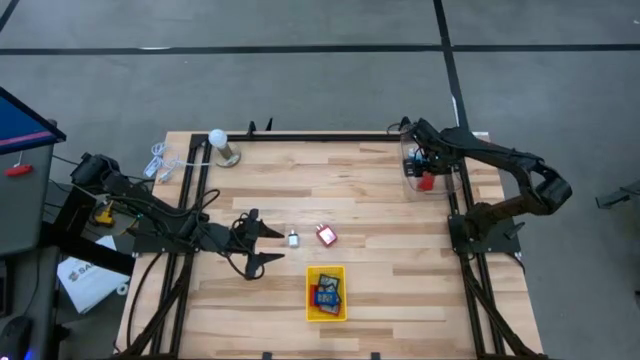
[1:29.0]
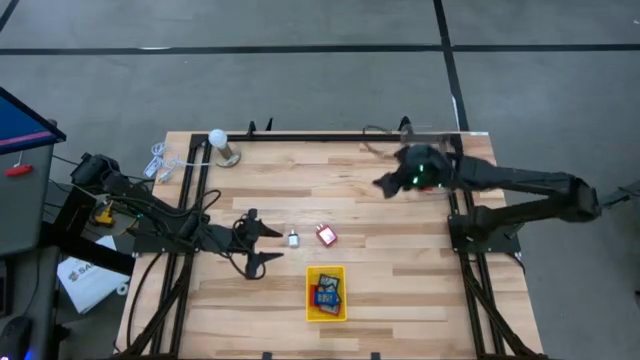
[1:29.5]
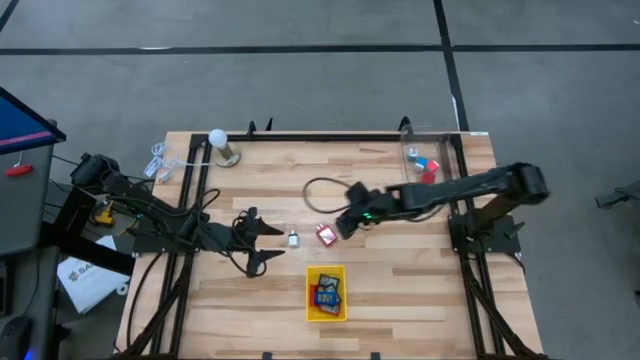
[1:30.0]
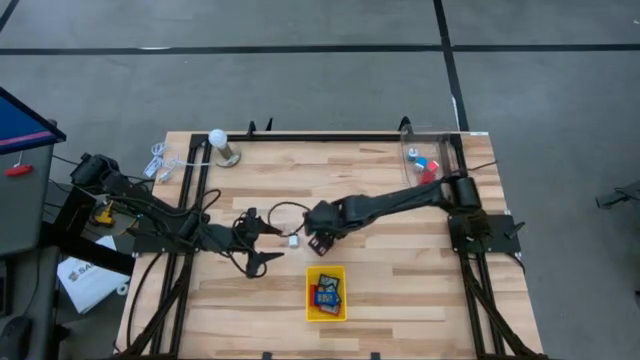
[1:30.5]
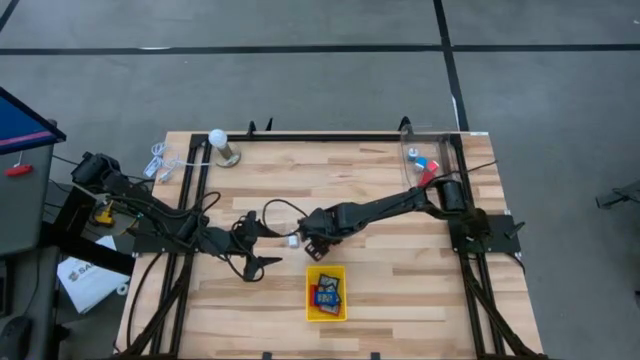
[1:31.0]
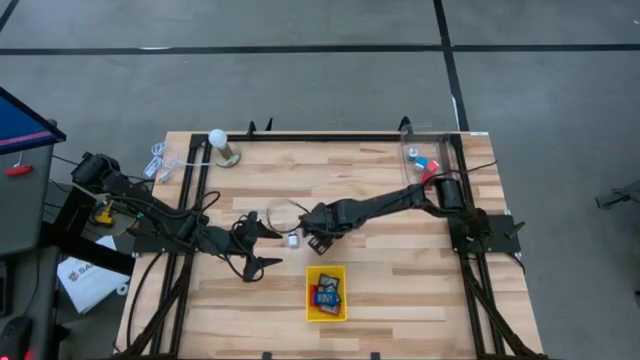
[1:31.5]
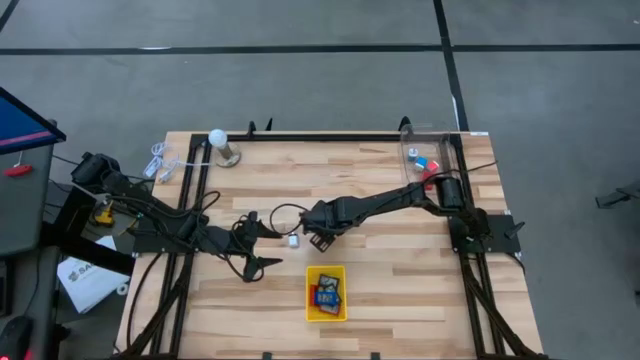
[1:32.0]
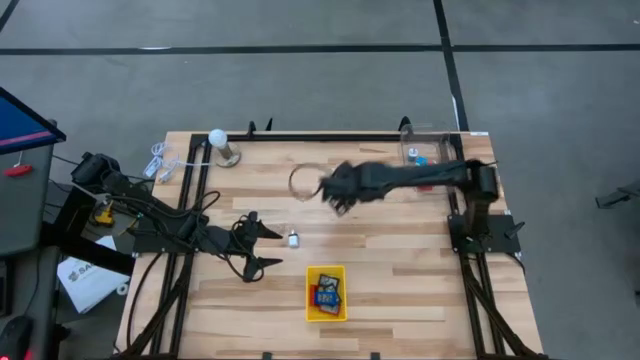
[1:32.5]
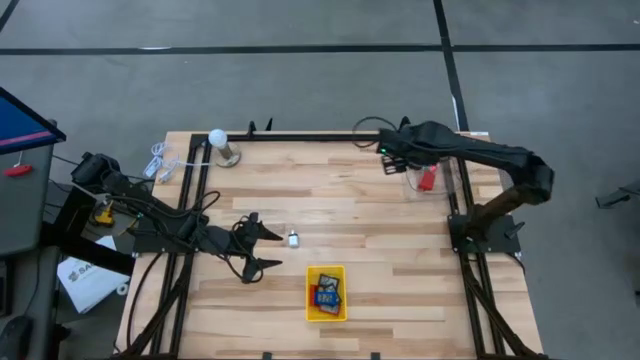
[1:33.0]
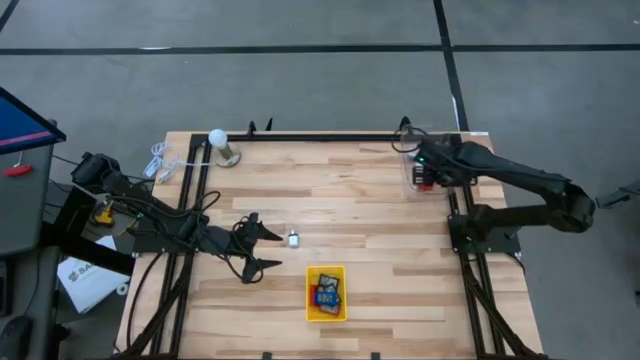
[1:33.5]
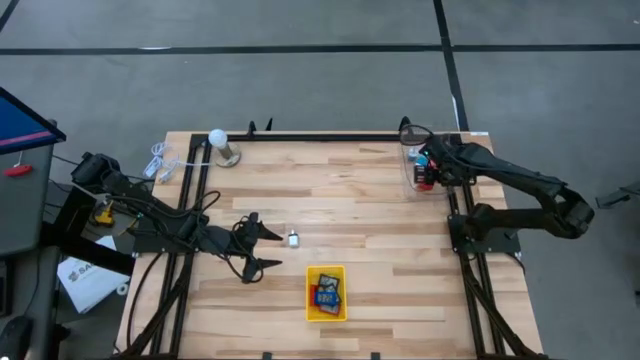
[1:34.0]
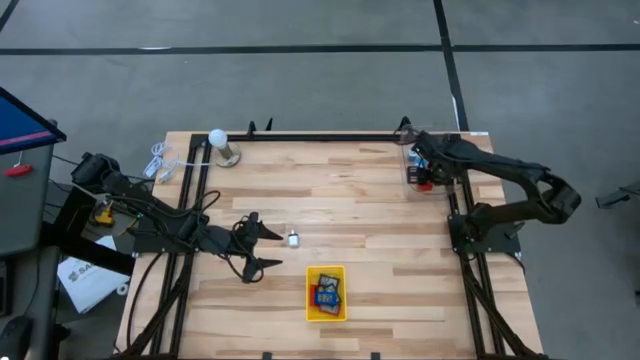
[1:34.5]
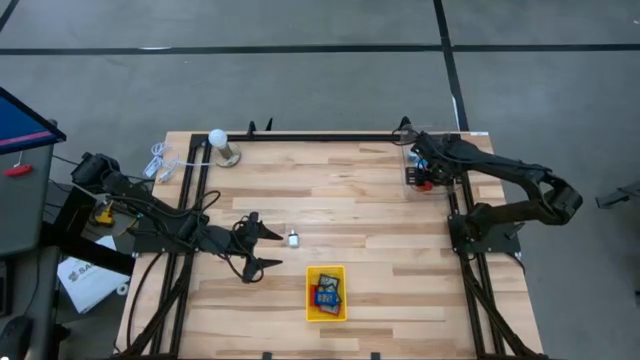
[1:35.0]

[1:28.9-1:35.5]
Task: Pick & Place Office items
Put the red charger adapter into the transparent bin

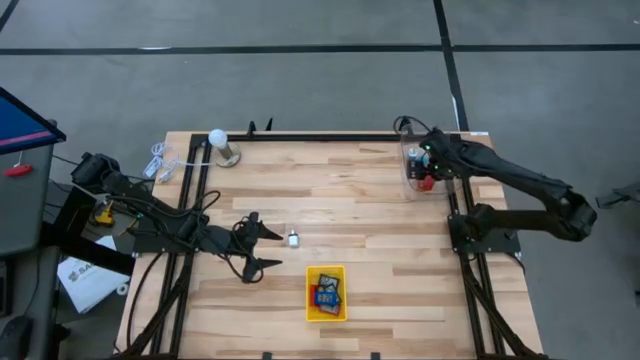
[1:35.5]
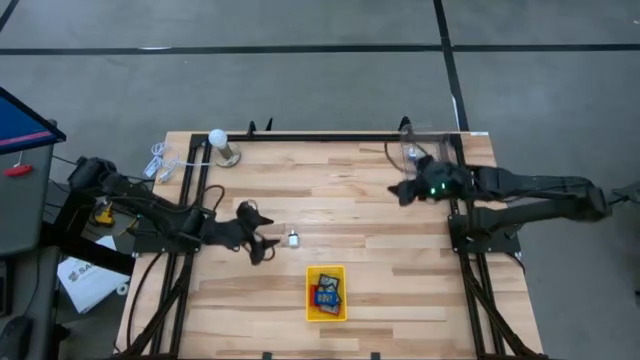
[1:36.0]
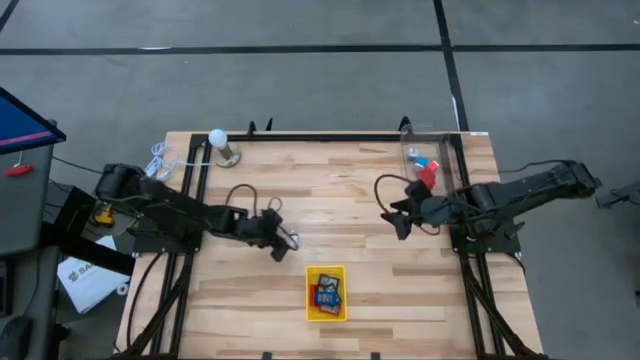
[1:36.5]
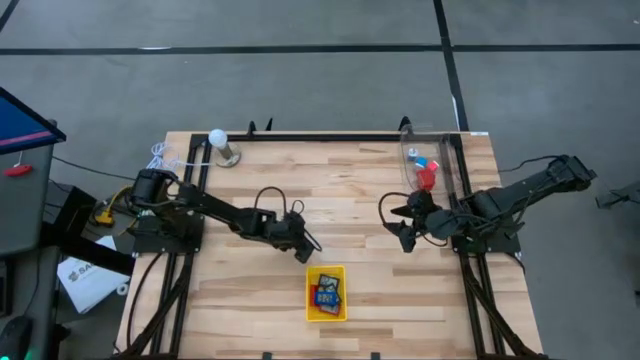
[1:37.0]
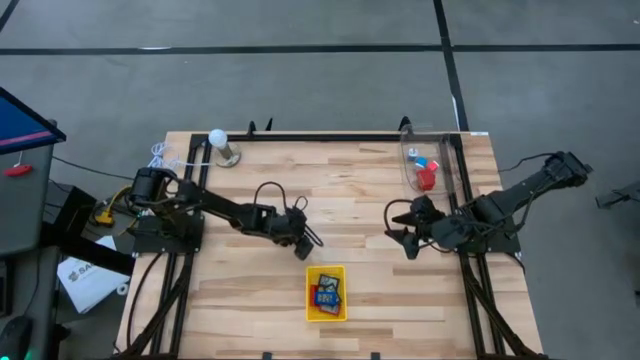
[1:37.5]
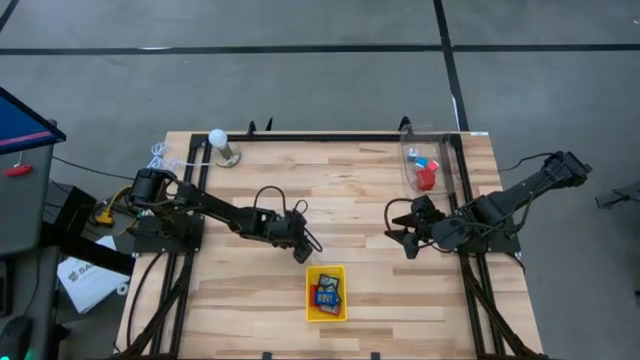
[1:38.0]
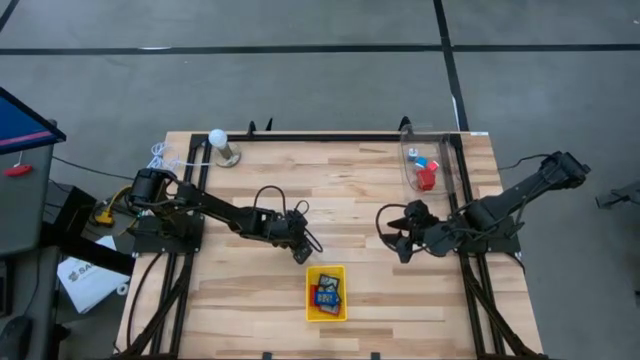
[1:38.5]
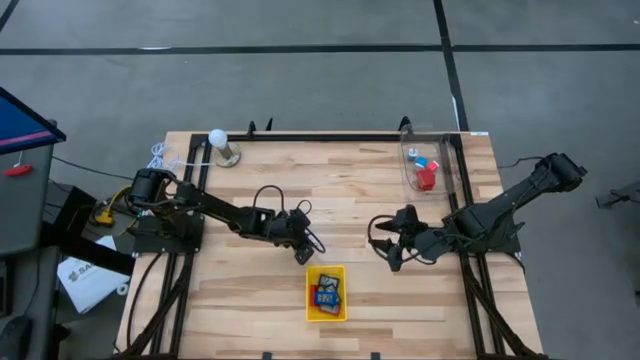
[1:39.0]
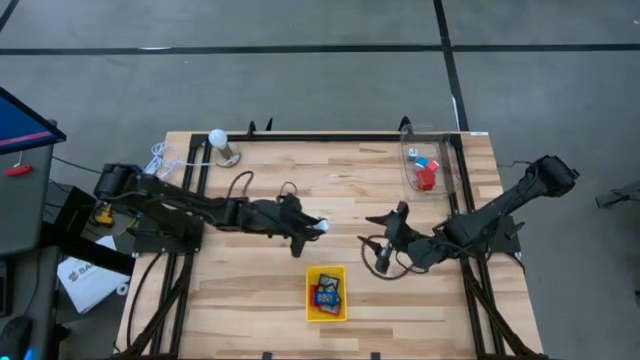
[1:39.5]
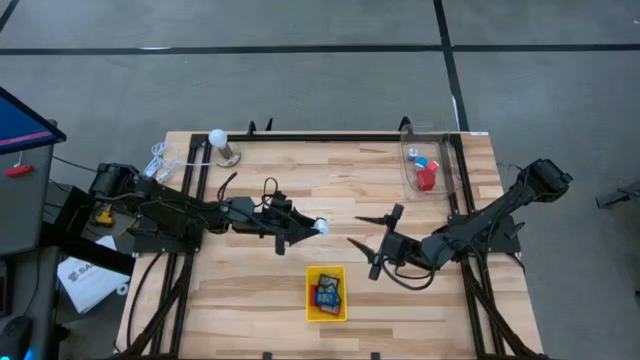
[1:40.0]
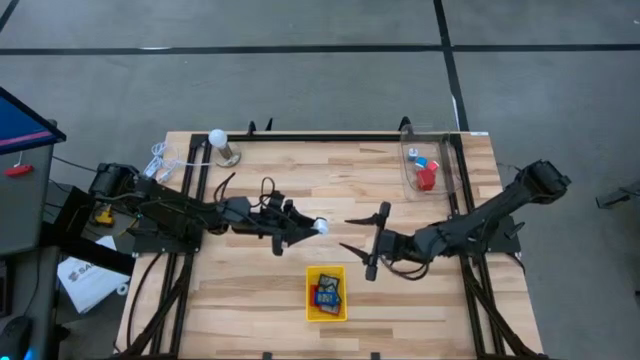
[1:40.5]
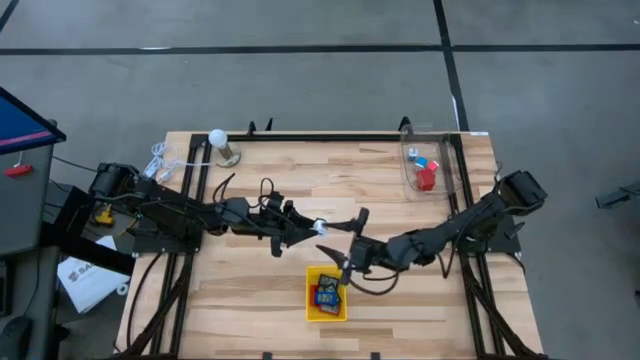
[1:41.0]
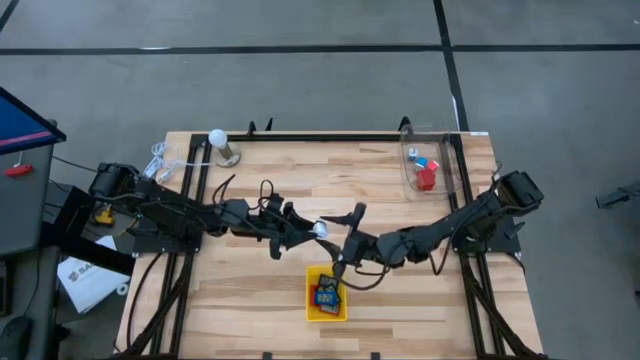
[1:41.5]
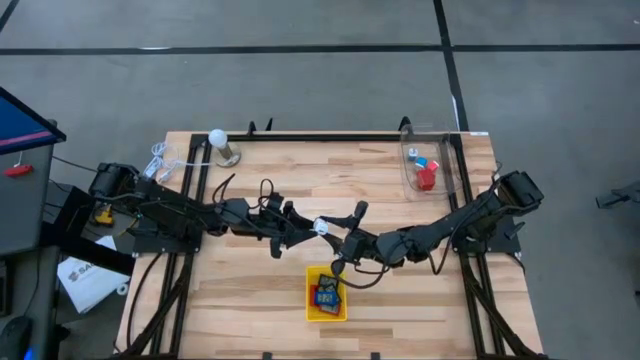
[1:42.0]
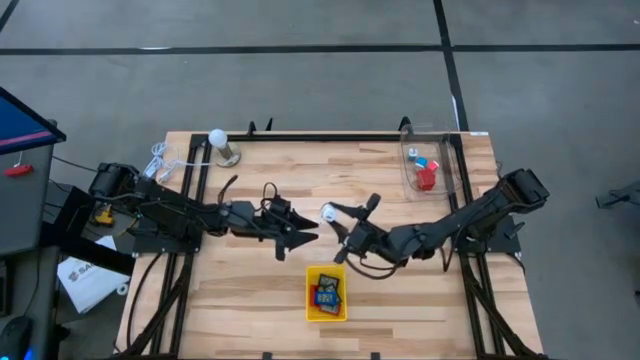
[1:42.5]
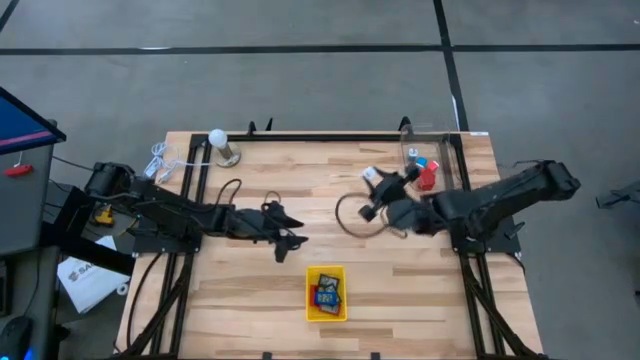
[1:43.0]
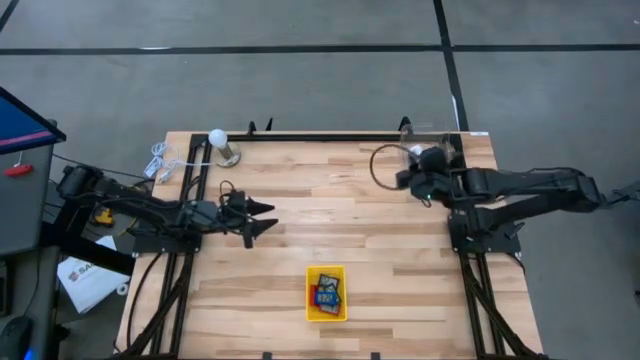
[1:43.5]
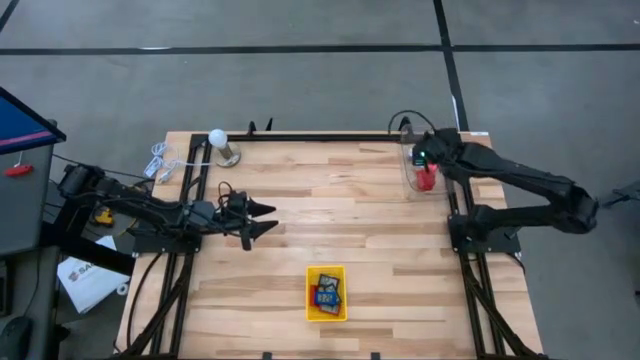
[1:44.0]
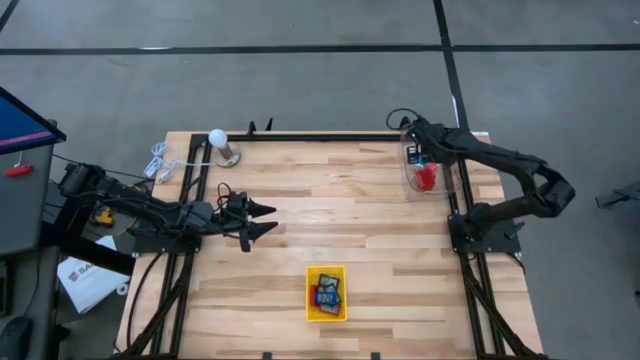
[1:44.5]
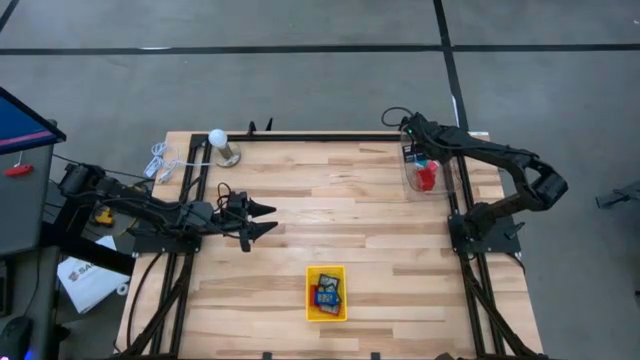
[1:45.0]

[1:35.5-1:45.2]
Put the white charger adapter into the transparent bin

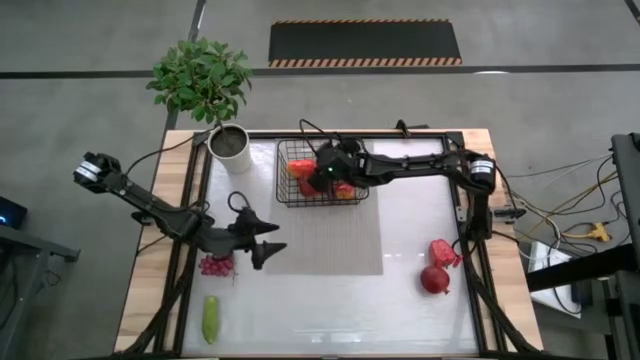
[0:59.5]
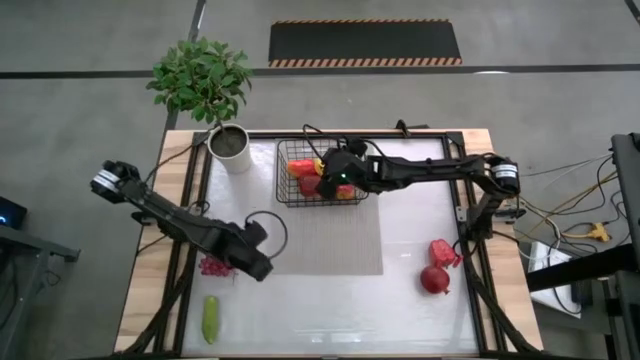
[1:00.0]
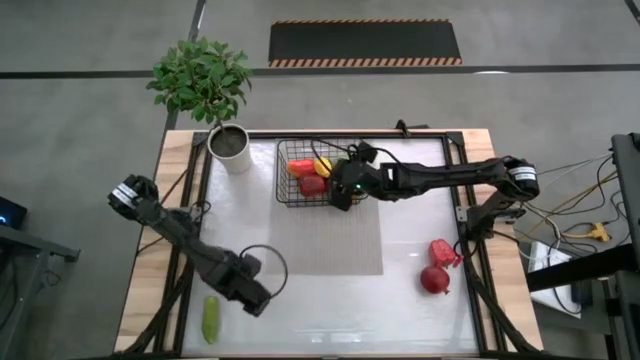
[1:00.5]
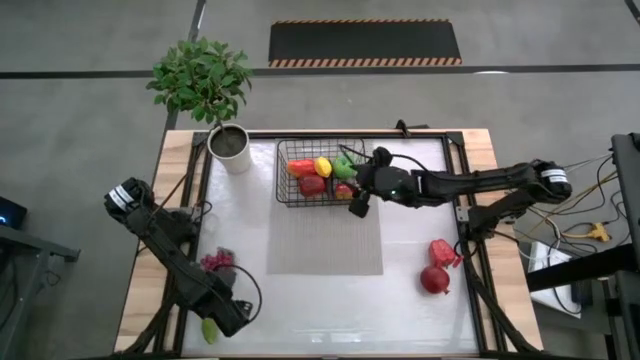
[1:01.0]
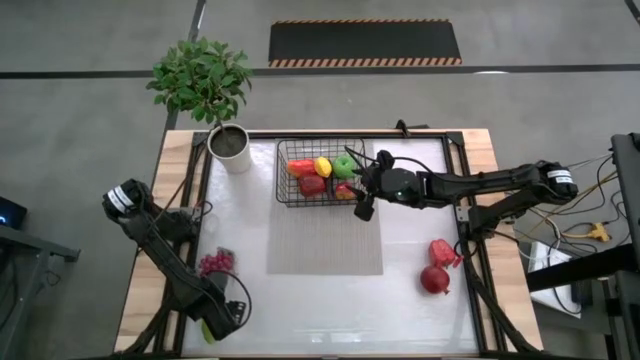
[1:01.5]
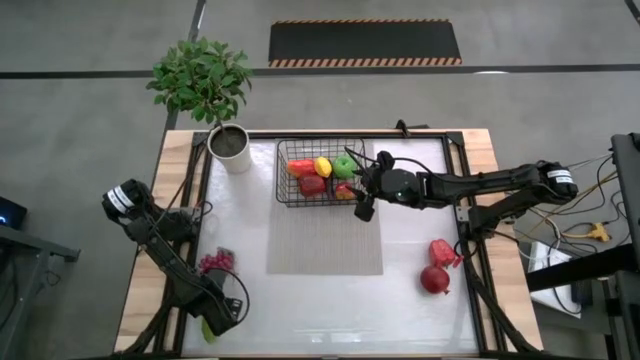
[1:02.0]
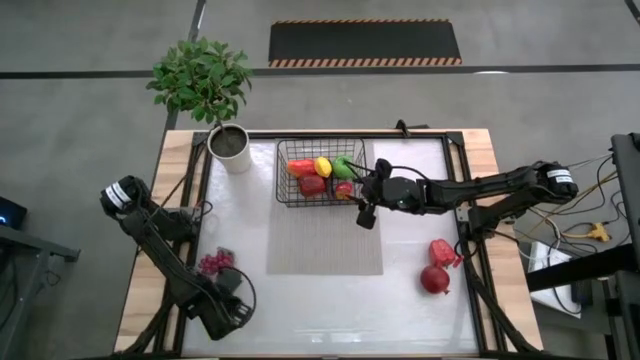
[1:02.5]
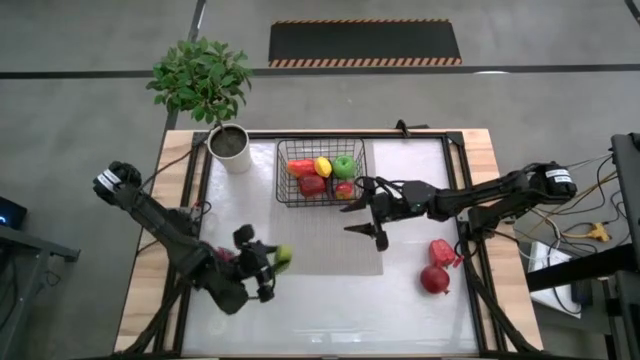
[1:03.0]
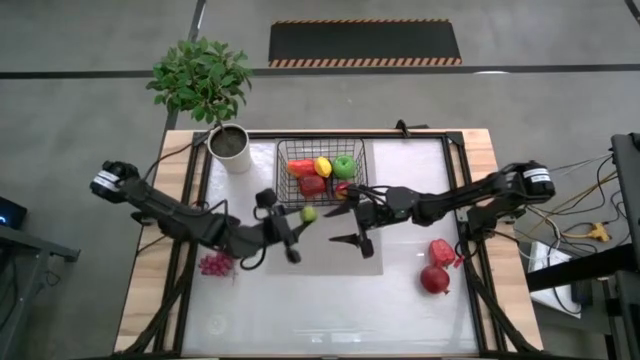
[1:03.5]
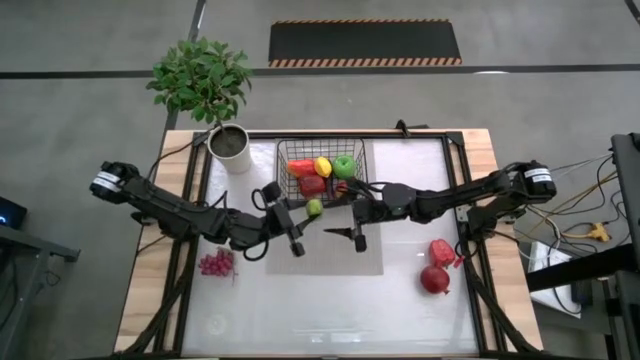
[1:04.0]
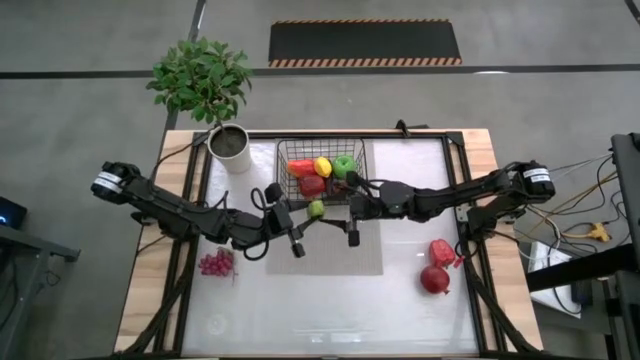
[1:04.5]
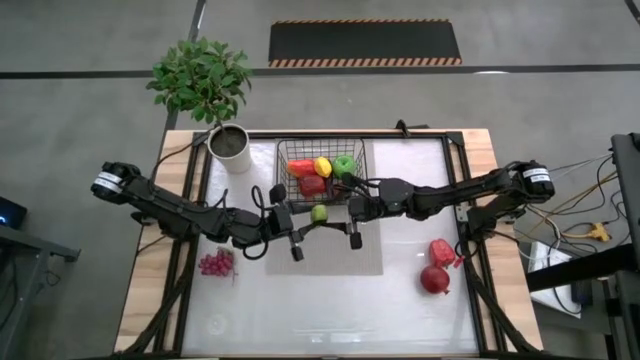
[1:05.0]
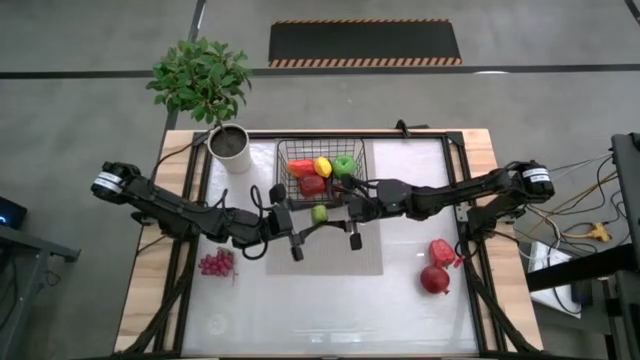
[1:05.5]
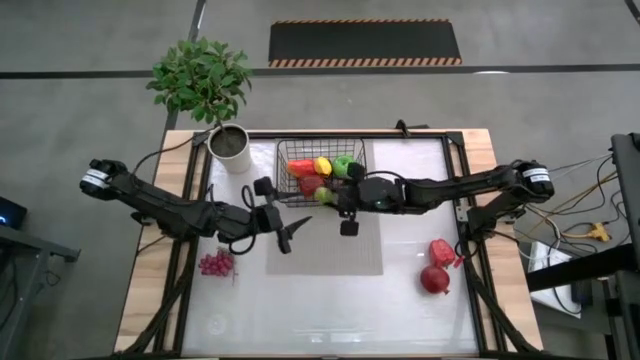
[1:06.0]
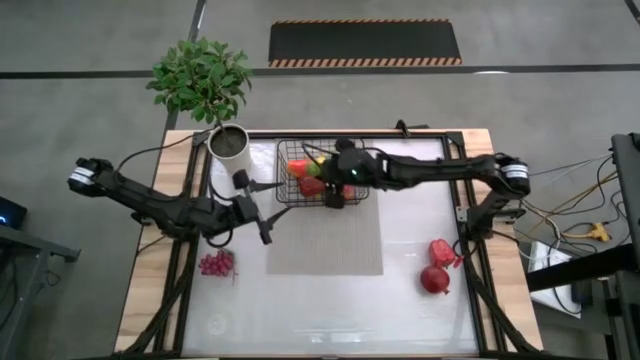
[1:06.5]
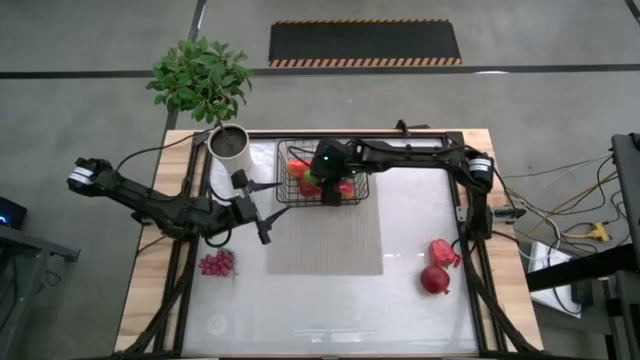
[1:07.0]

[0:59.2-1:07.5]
Task: Build produce basket
Put the cucumber into the wire basket
